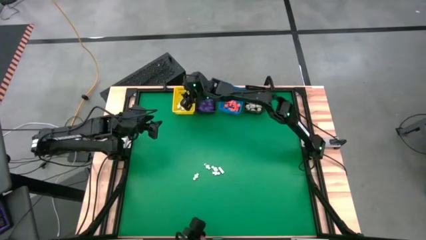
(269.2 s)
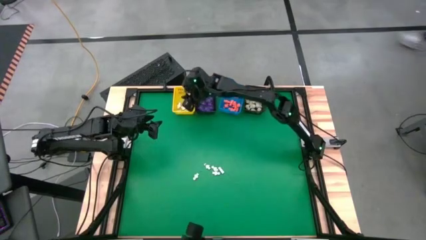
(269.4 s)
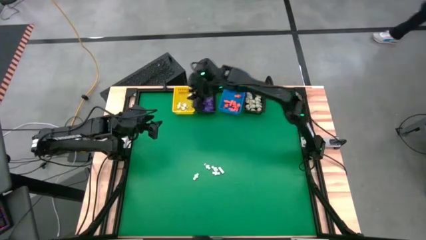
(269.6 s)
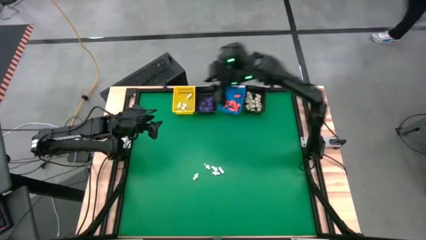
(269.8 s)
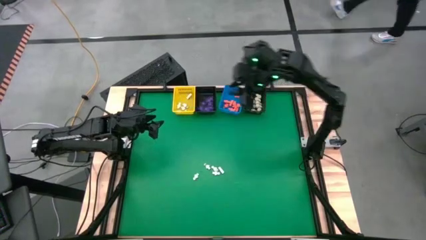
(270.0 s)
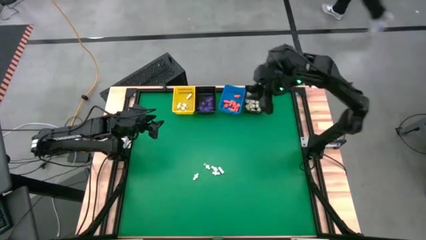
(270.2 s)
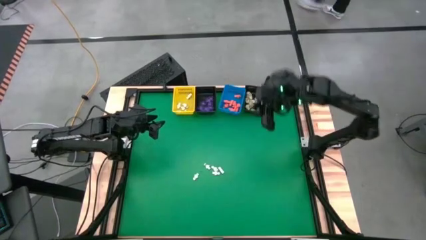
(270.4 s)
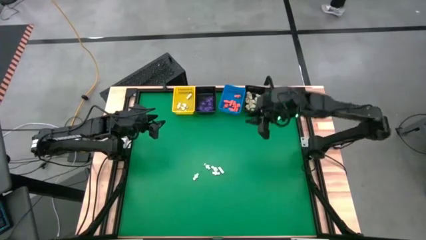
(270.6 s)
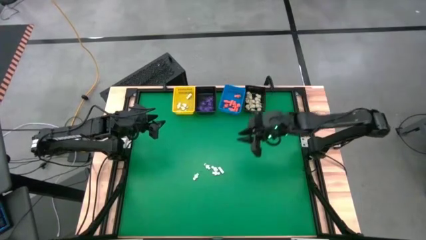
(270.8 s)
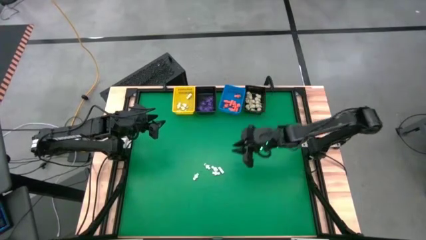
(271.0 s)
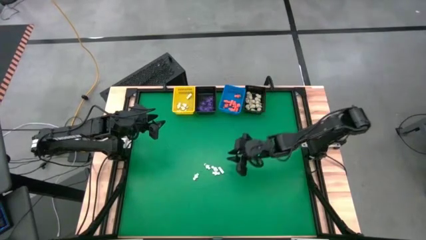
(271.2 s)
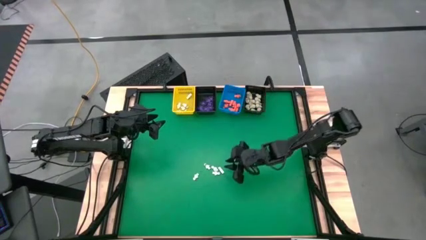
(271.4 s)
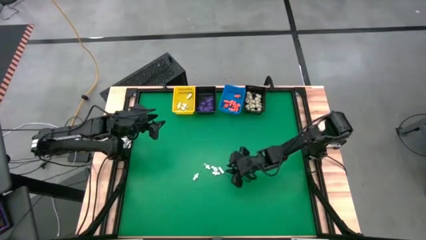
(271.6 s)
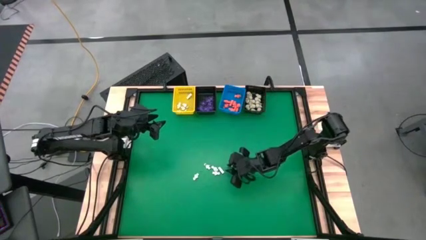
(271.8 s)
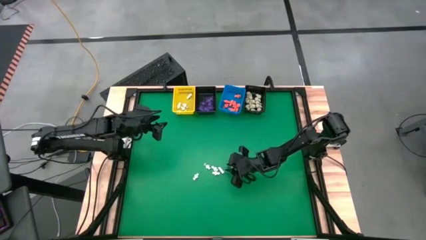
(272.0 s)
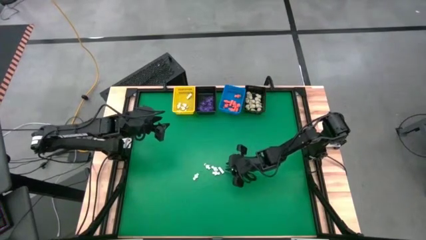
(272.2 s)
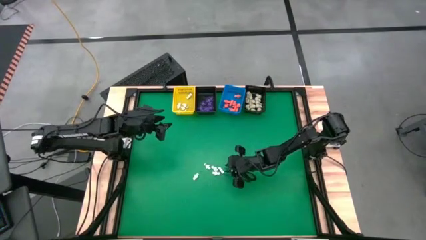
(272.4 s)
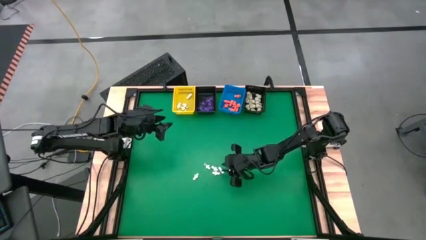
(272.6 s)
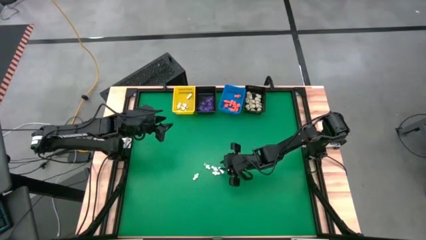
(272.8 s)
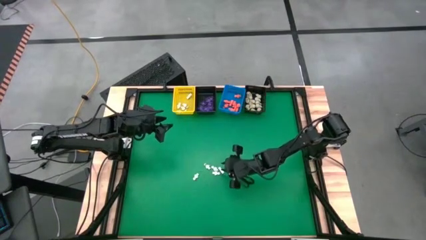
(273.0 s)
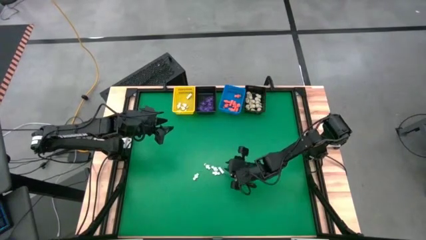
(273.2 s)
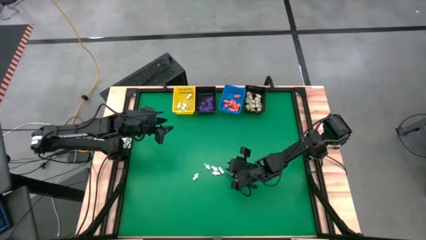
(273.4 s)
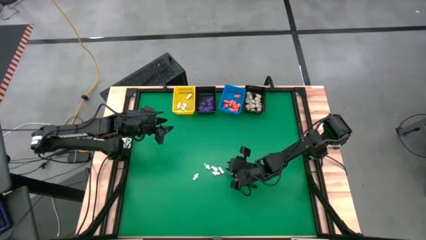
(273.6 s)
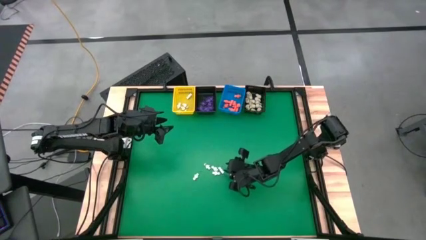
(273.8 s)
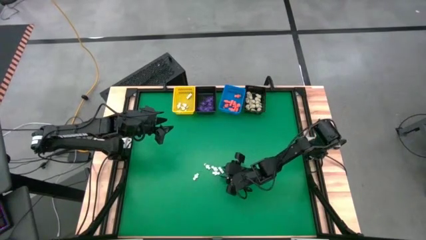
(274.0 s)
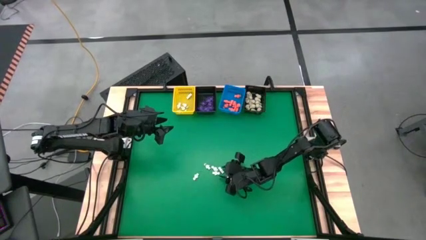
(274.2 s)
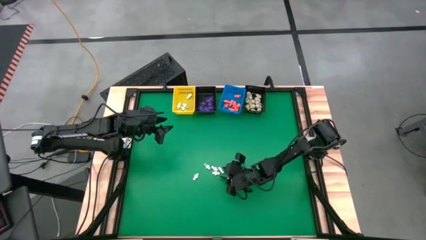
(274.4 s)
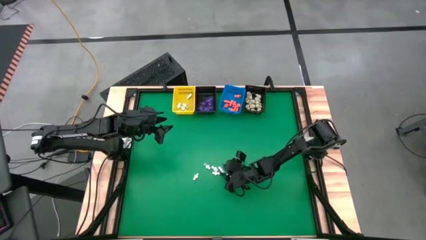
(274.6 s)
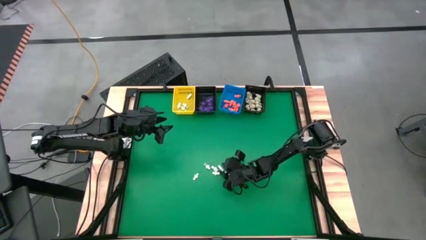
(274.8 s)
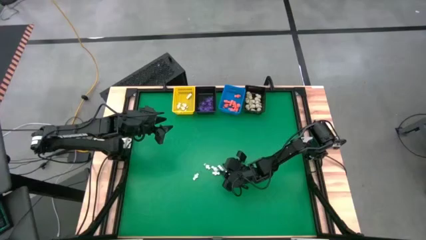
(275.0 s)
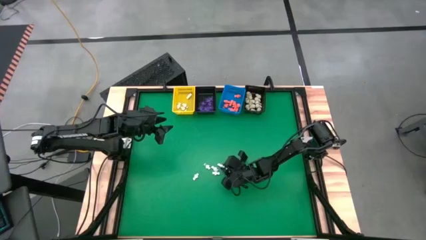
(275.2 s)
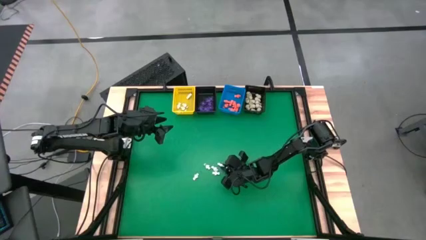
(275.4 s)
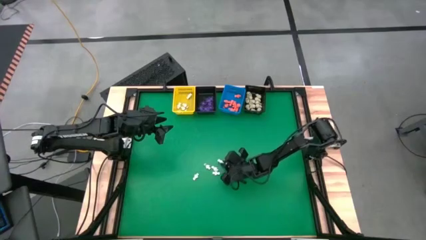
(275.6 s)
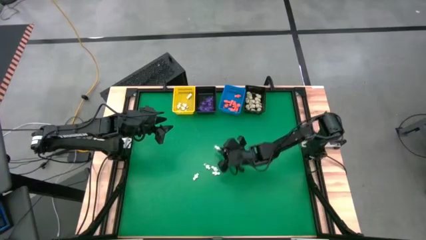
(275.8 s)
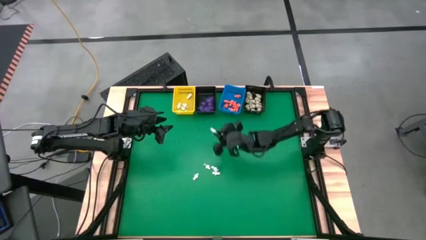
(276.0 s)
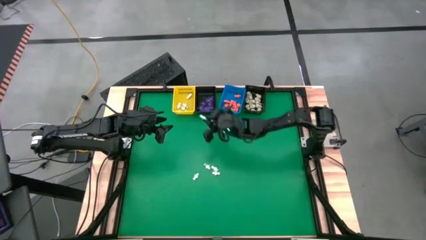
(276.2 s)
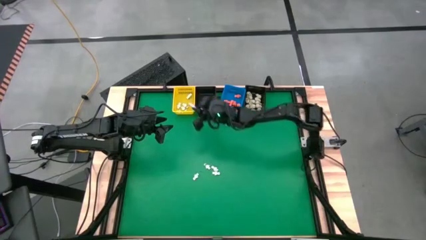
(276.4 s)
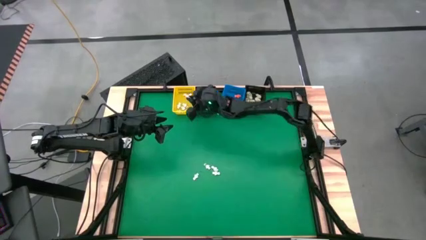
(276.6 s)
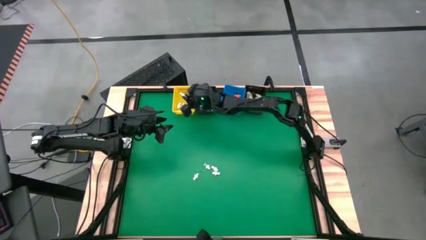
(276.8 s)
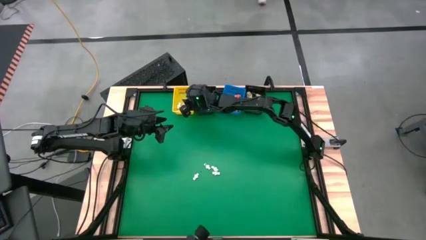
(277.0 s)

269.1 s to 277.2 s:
Task: Sort Halloween decoration
Put the white skeleton toy into the yellow basket

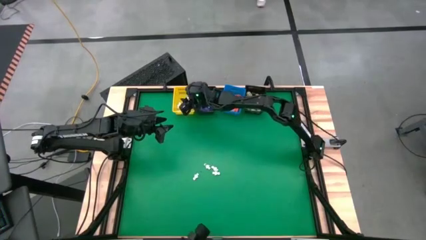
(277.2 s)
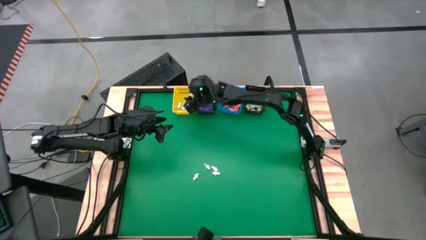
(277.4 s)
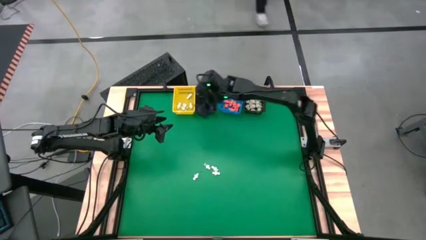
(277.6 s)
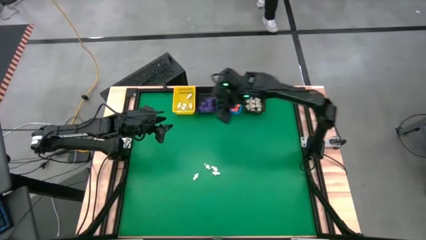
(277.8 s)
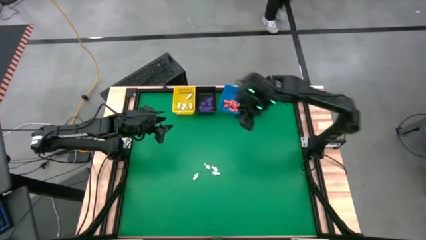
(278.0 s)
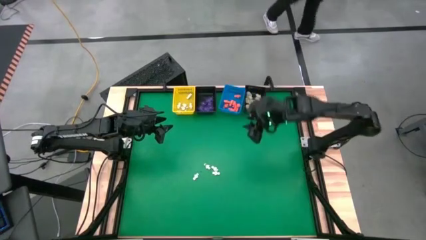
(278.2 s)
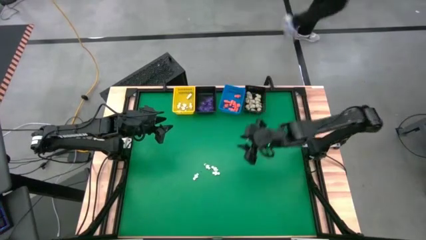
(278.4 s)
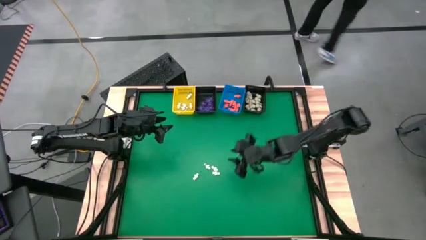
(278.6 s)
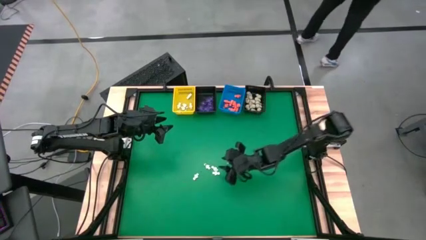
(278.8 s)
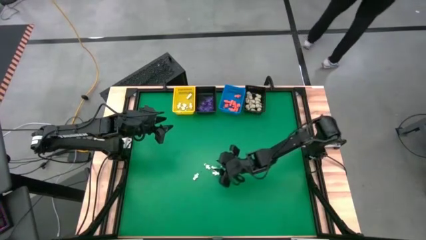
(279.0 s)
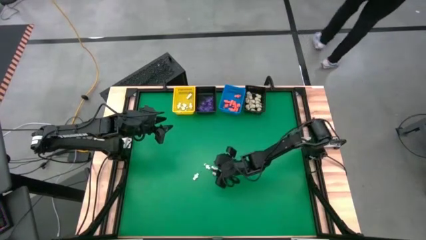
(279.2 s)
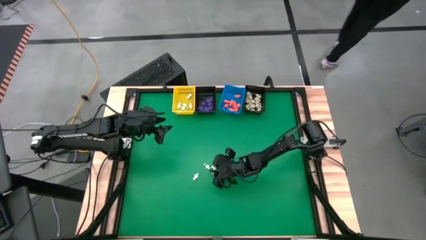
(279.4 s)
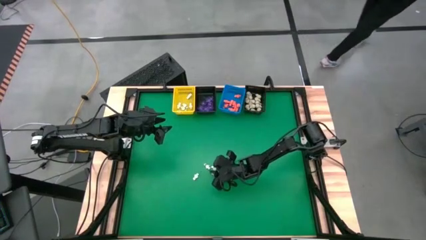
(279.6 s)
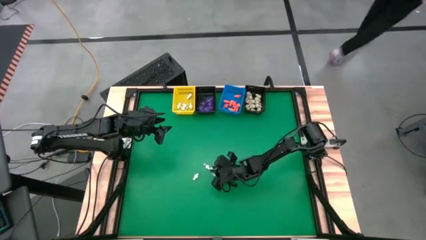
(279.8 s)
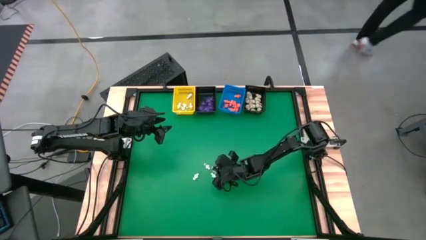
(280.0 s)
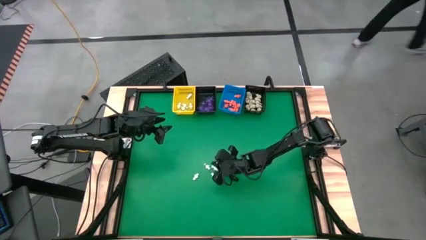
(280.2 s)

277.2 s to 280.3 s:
Put the white skeleton toy into the yellow basket

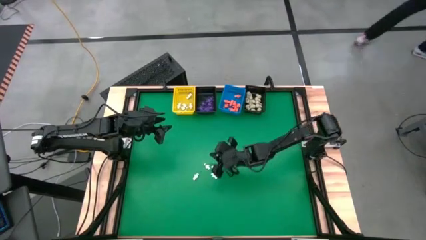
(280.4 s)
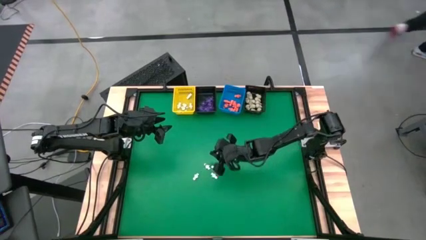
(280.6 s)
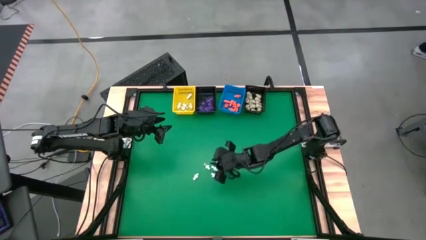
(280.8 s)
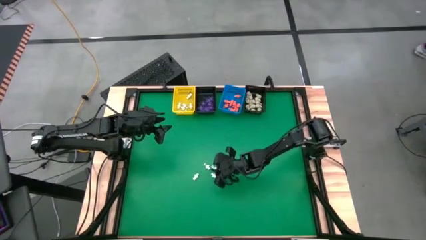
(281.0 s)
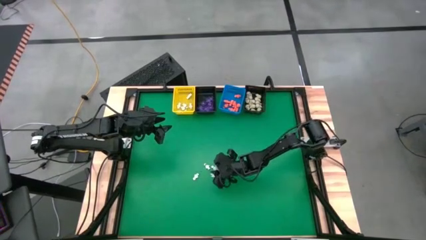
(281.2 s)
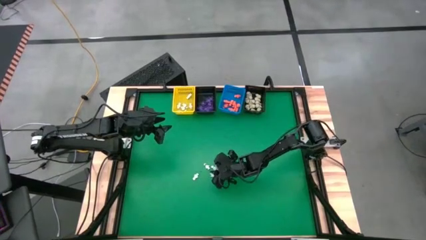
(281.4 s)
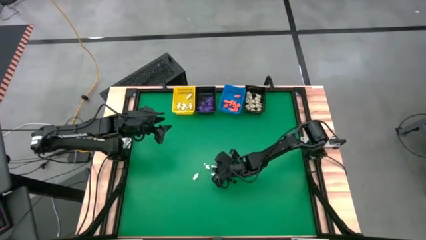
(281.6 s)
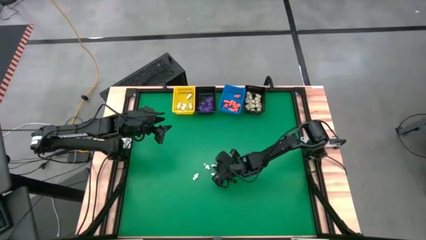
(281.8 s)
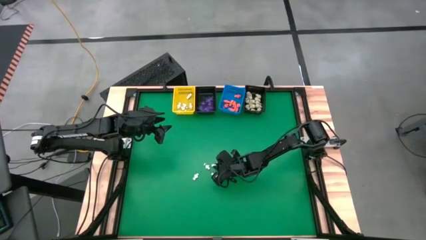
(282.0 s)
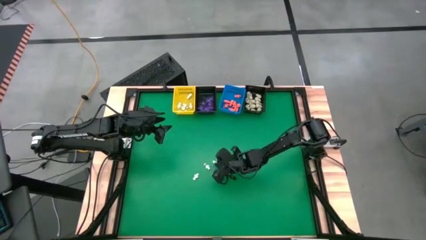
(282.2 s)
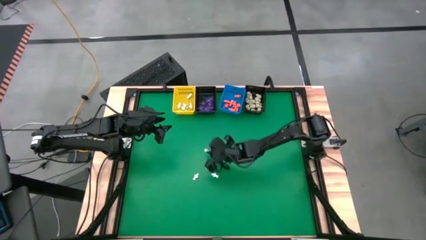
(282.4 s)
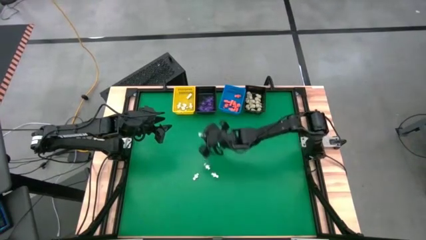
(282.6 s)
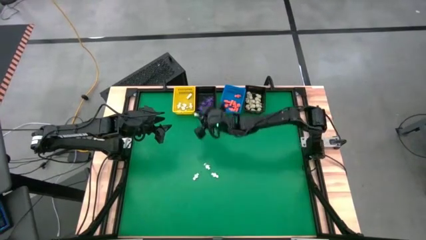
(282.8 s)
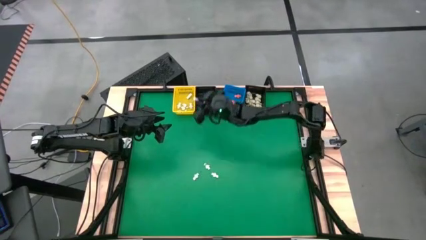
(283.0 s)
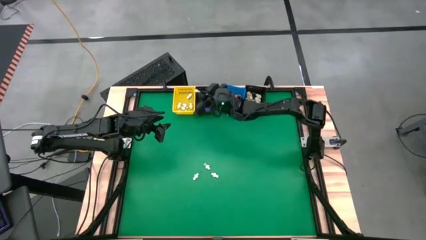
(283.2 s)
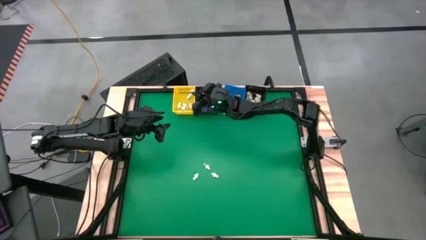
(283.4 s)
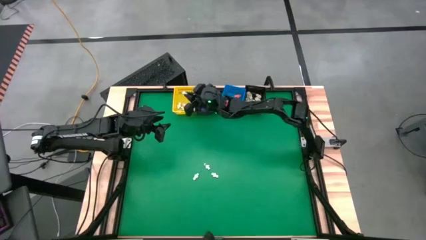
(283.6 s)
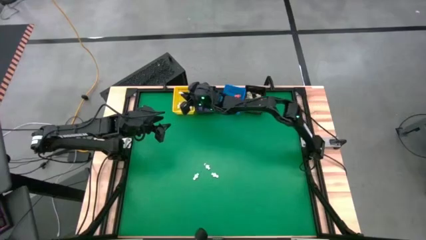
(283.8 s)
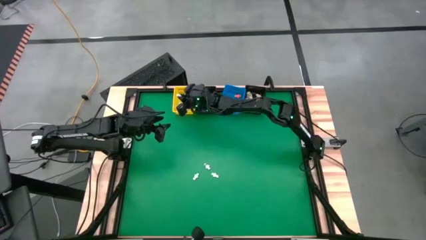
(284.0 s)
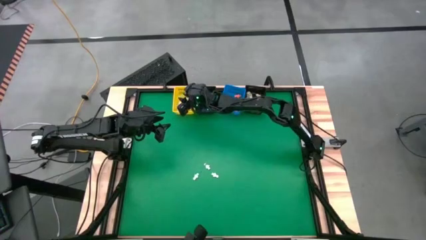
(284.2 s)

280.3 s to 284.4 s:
Put the white skeleton toy into the yellow basket

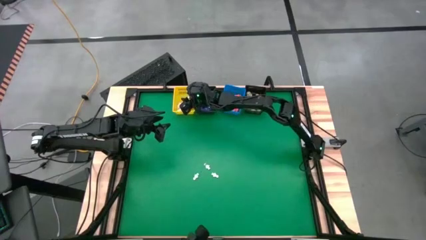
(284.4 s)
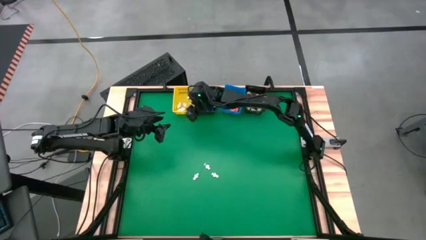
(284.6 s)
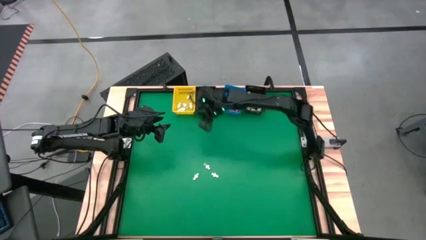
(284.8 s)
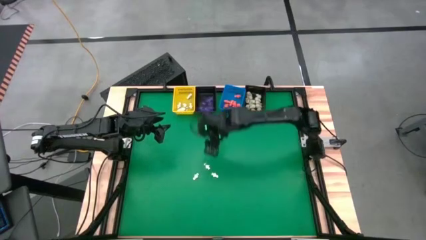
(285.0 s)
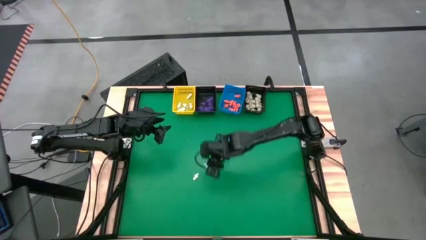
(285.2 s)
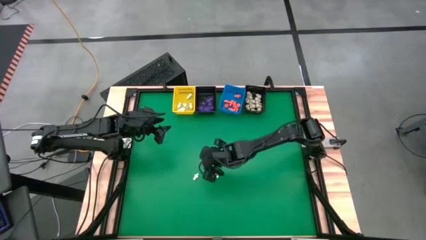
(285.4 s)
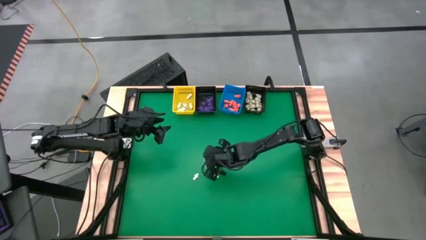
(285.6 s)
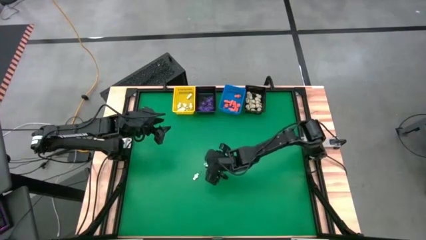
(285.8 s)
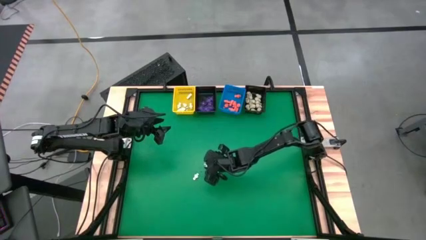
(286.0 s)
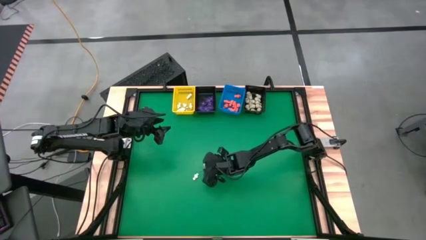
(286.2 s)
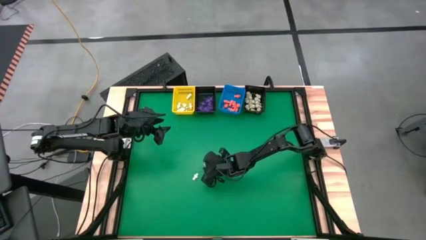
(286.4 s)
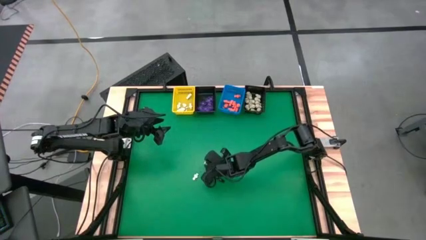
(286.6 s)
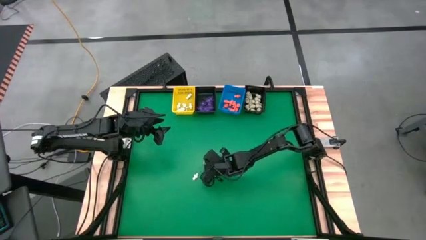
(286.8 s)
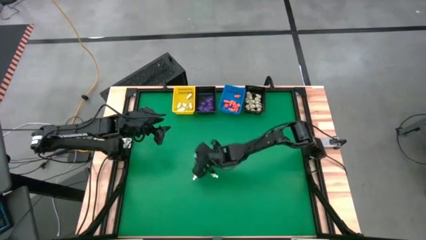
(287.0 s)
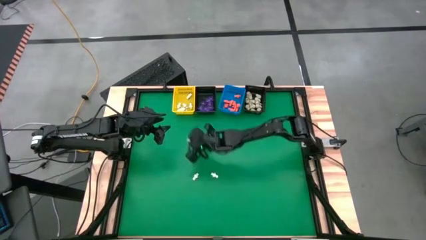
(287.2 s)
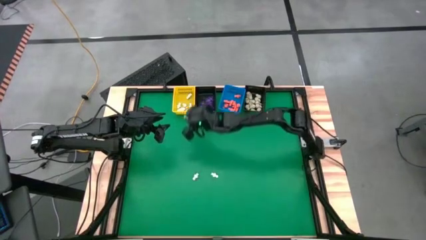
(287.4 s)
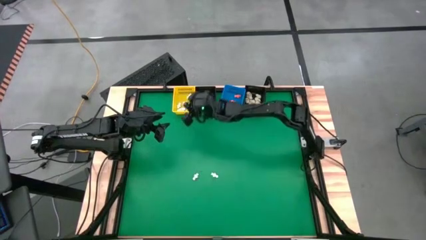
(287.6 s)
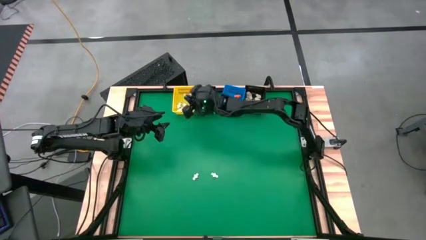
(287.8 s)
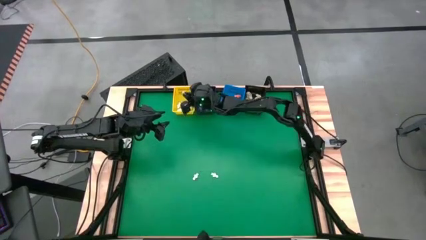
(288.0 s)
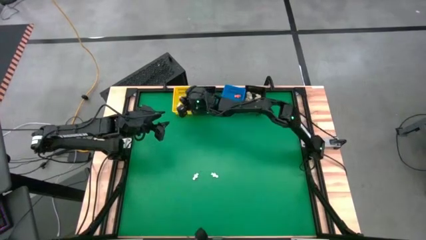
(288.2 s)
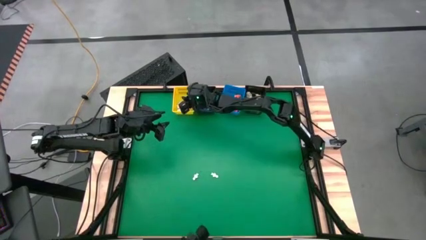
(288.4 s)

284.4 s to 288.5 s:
Put the white skeleton toy into the yellow basket
